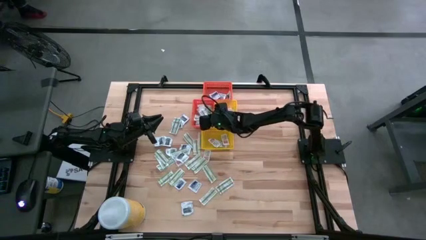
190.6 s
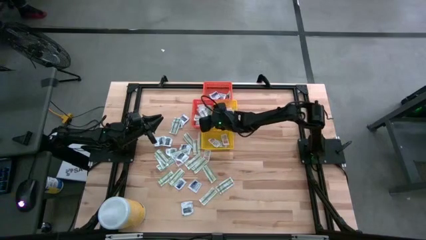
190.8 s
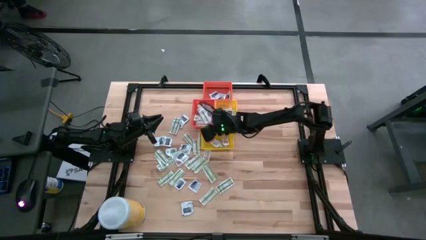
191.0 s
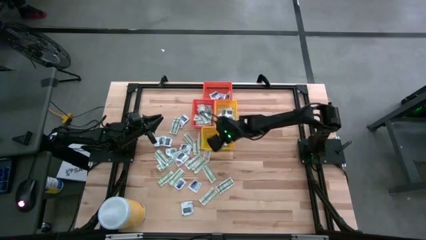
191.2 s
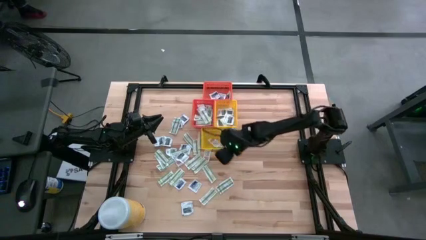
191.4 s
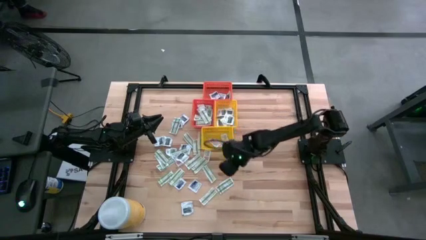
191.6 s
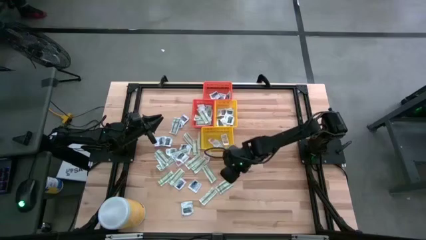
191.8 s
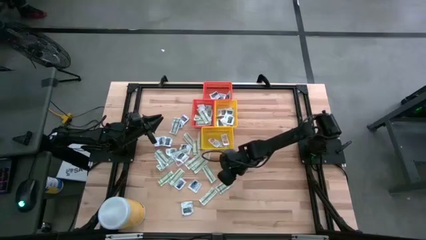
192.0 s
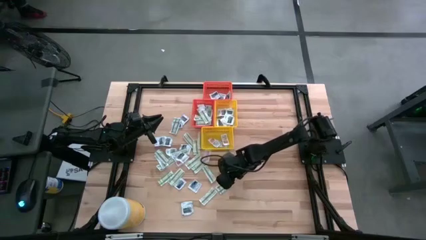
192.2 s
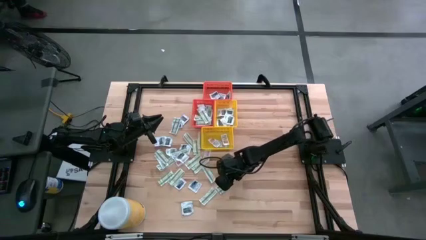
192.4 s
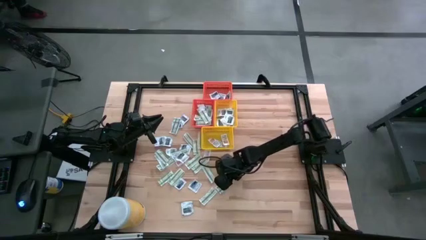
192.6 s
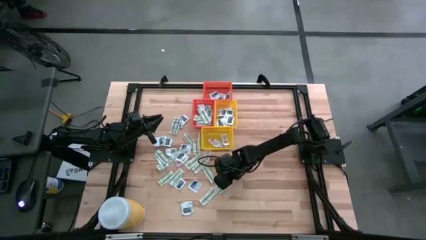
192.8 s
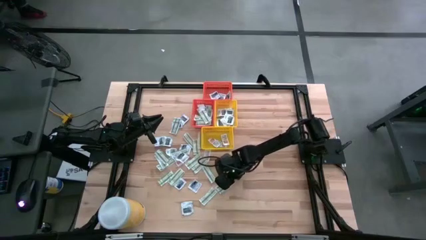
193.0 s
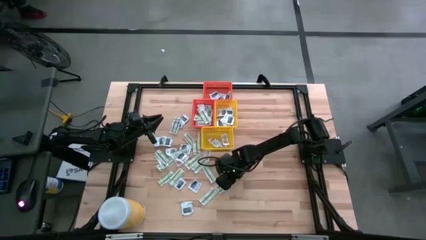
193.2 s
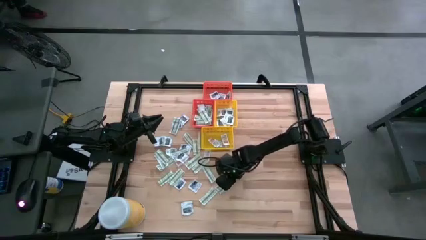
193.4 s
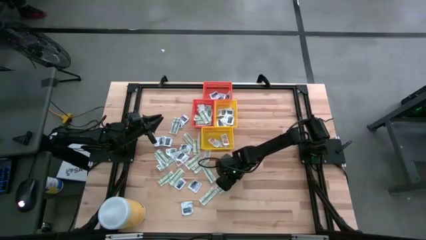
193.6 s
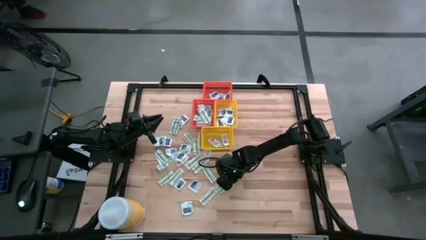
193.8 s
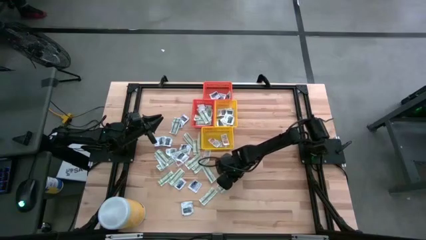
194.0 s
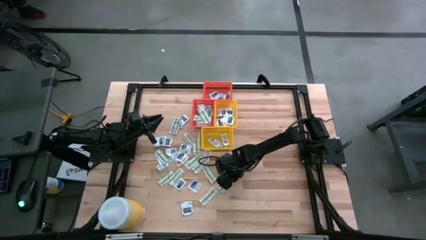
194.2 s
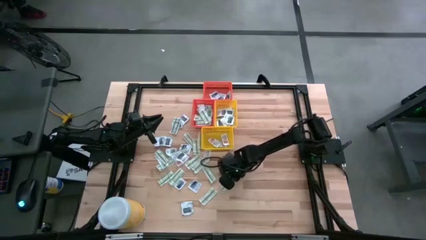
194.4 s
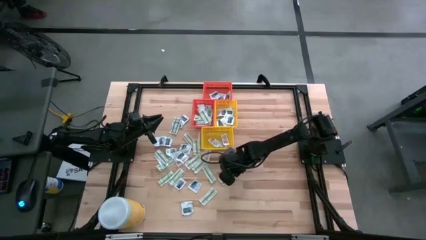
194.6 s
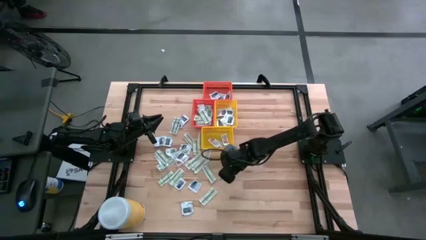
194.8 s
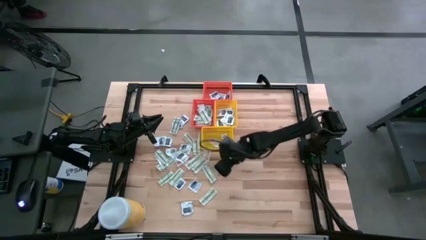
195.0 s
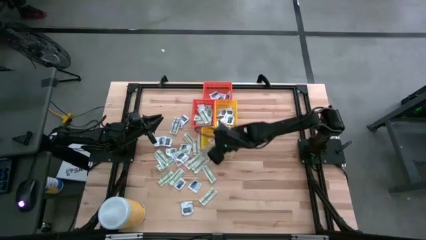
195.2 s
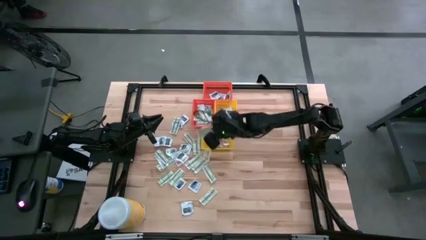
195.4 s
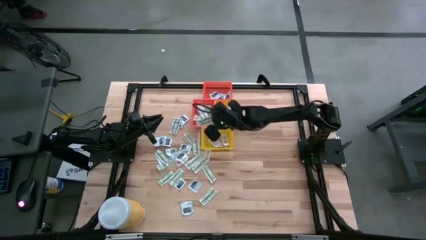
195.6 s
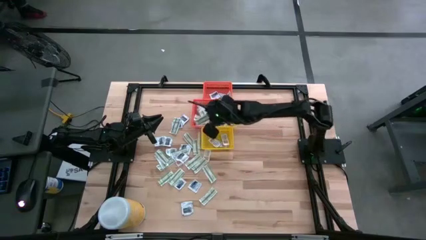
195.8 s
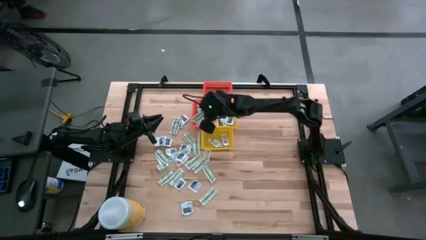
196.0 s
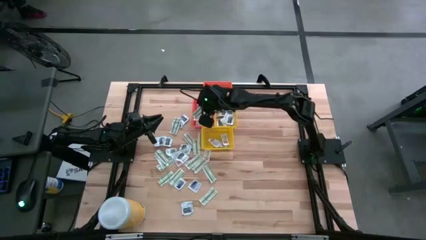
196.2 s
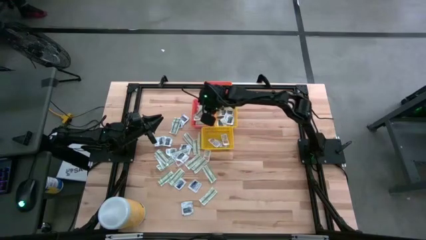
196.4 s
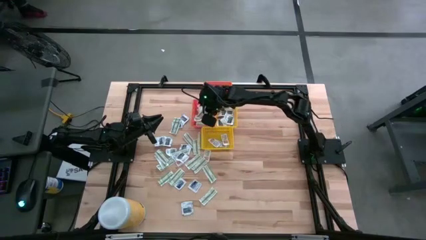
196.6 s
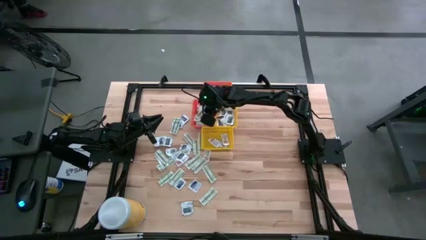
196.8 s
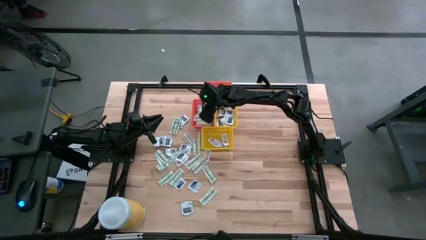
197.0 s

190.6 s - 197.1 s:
Task: Pick & Place First Aid Supplies
Put the bandage into the bottom orange bin

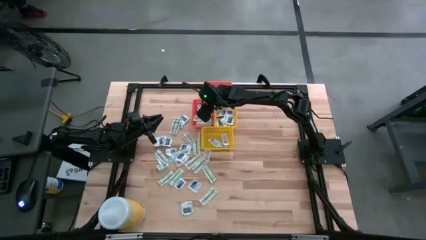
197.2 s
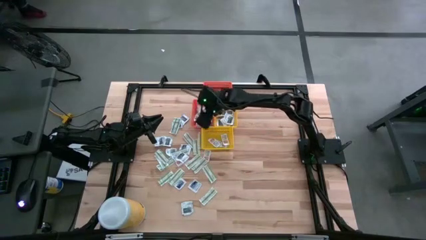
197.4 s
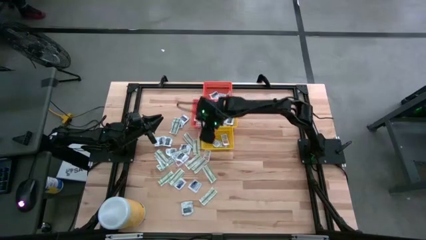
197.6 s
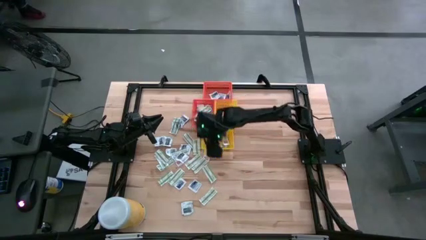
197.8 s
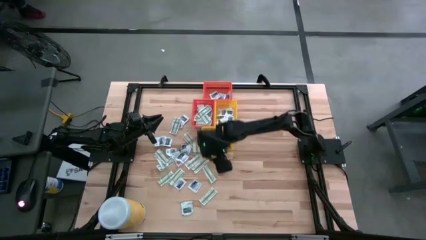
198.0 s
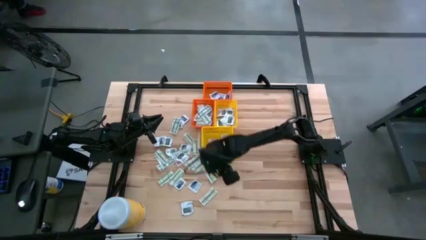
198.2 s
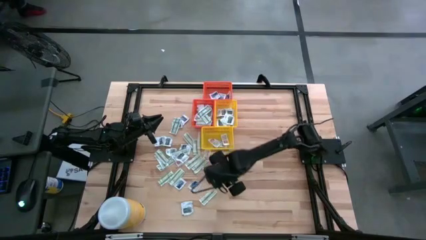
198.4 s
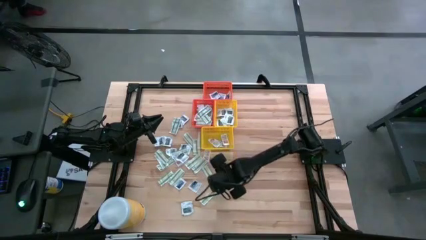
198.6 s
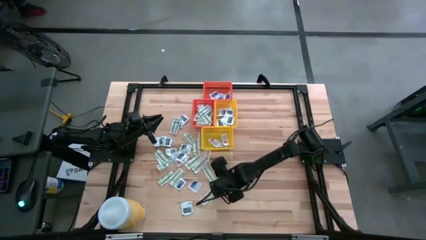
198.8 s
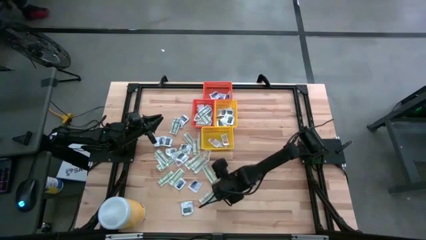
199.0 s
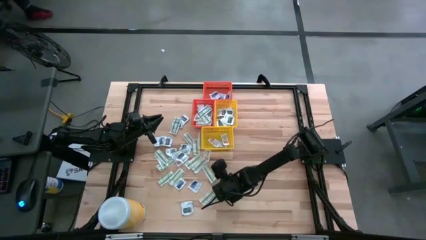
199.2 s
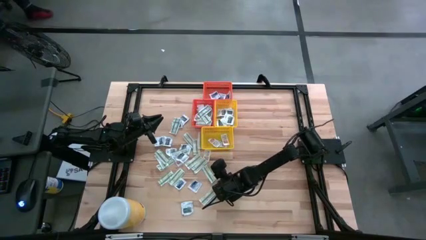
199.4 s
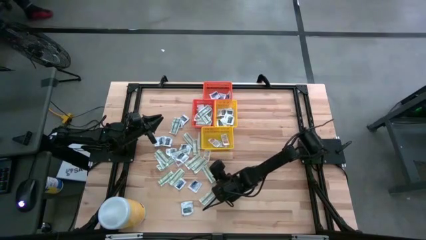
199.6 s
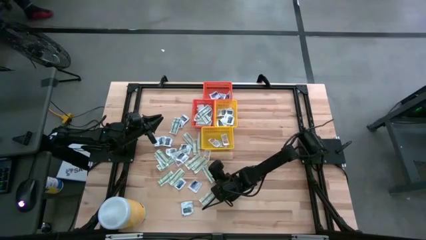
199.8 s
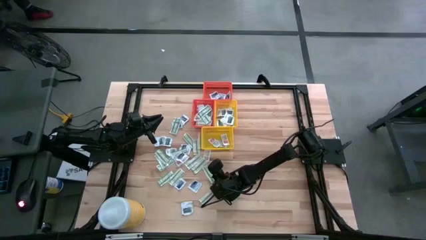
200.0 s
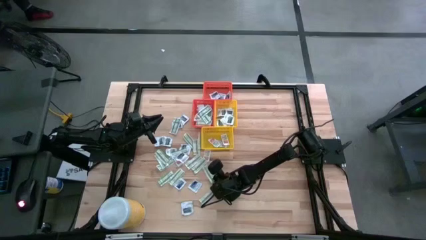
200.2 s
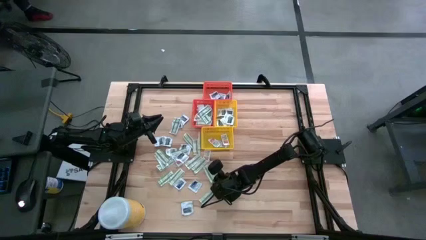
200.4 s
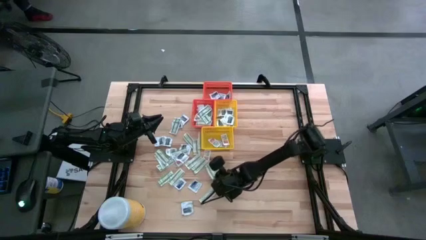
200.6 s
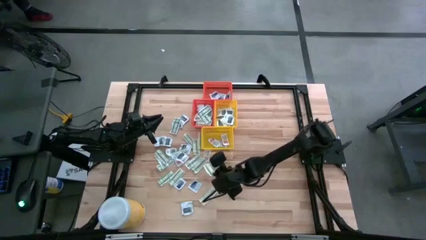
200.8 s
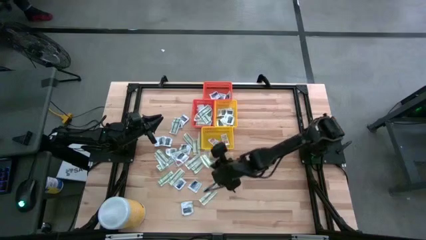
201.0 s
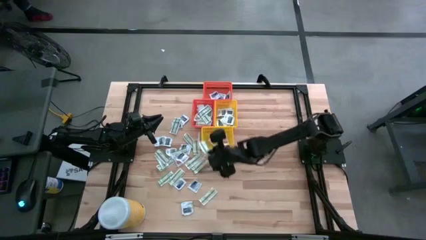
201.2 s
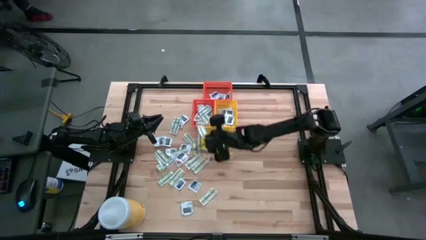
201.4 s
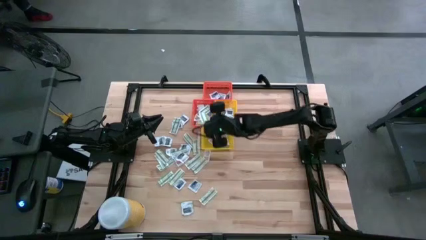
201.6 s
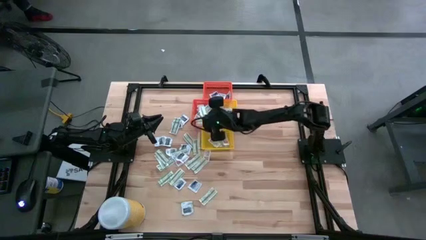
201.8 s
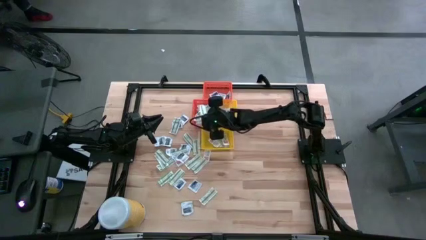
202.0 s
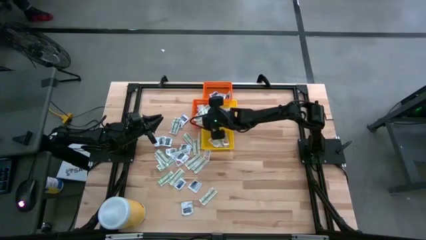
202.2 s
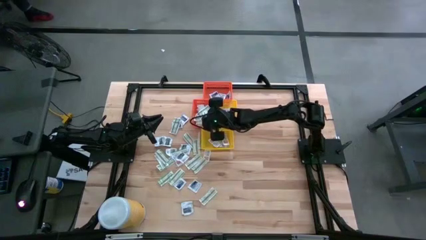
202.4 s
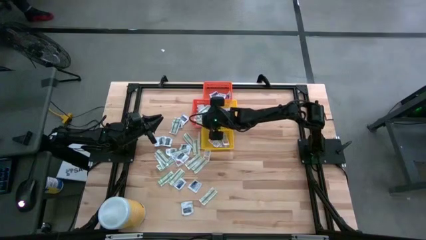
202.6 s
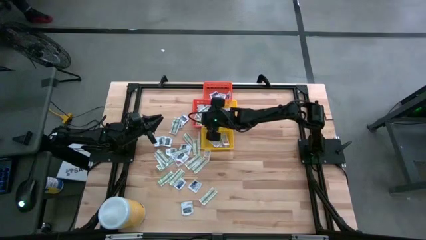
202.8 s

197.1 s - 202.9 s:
Put the bandage into the bottom orange bin

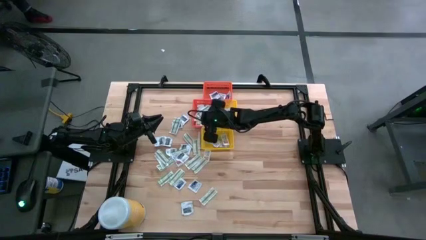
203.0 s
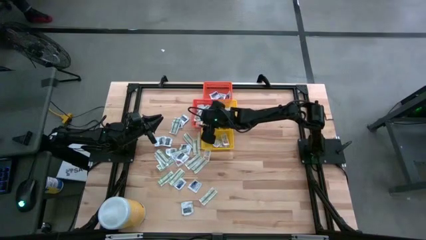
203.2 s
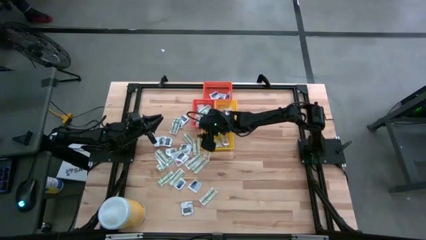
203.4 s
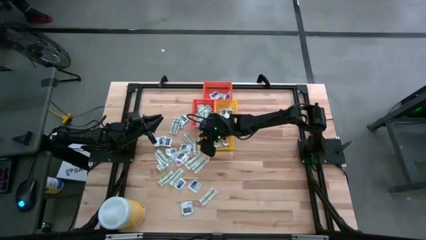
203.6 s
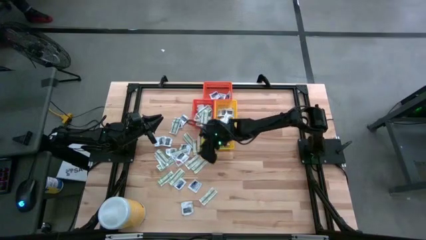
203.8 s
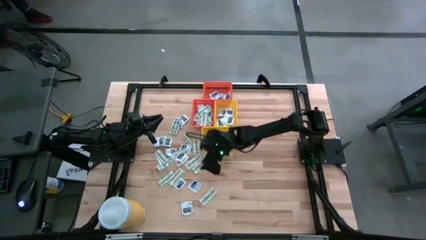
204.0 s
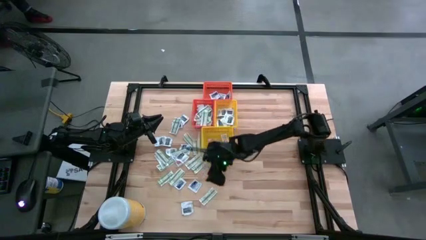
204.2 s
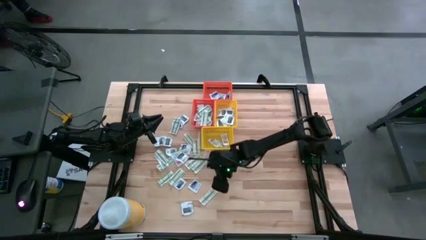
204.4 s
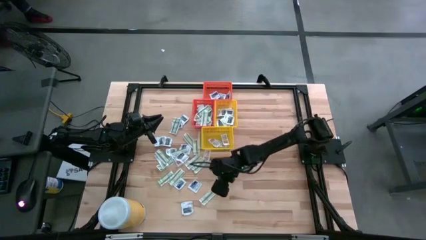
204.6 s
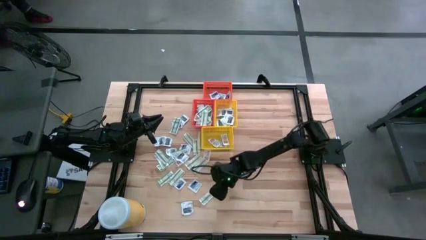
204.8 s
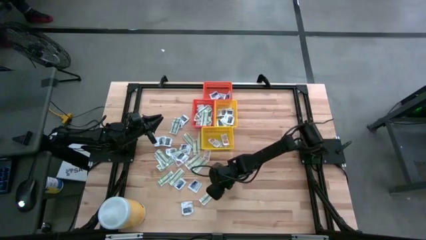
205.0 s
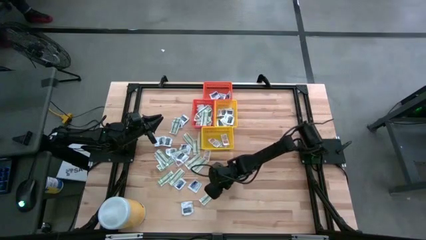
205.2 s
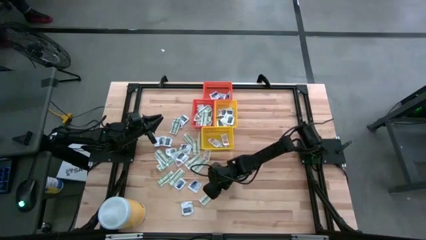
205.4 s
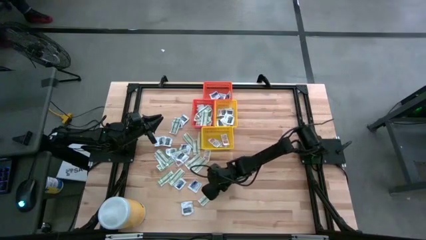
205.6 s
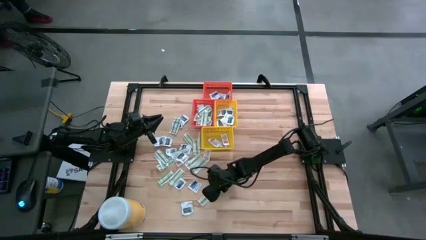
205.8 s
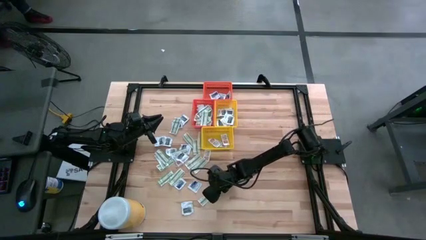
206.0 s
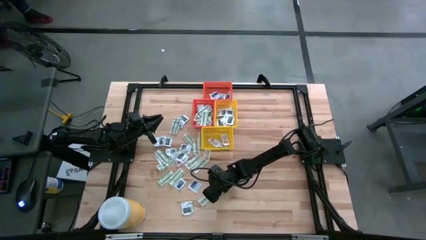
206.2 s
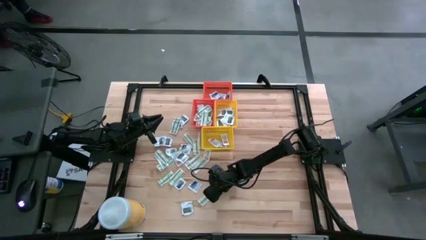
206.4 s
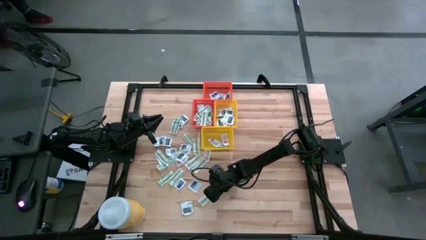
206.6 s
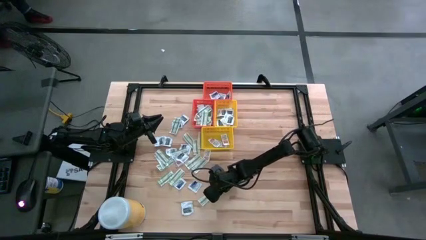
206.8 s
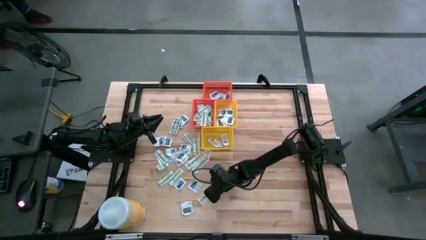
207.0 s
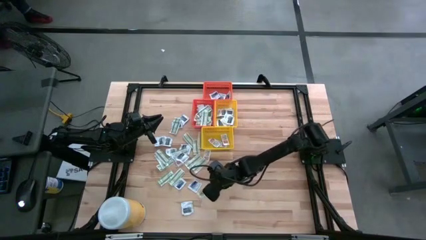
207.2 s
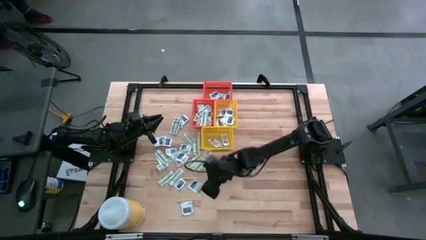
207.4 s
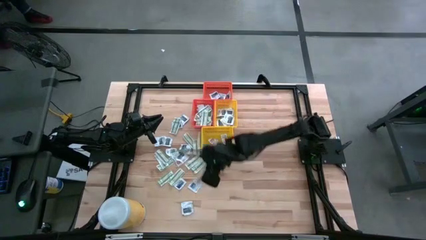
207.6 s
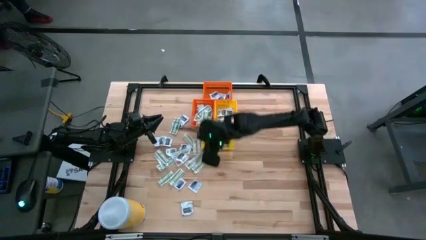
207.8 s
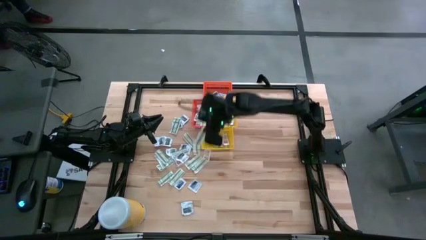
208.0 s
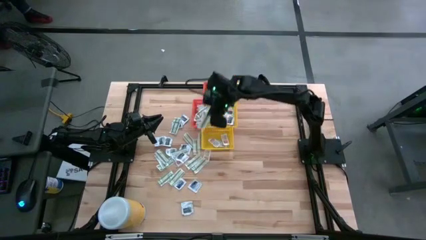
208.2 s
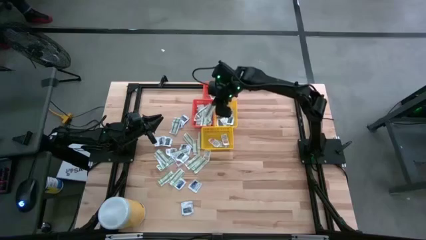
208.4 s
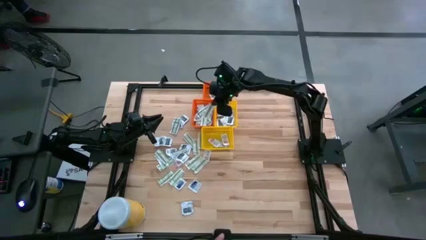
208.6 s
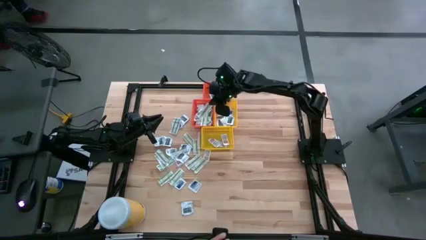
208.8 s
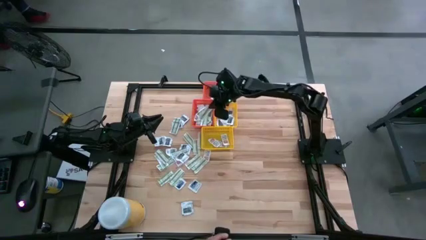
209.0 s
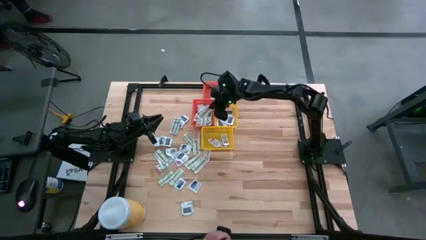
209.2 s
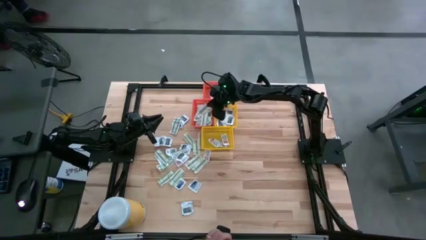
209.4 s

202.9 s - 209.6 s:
Put the bandage into the bottom orange bin
